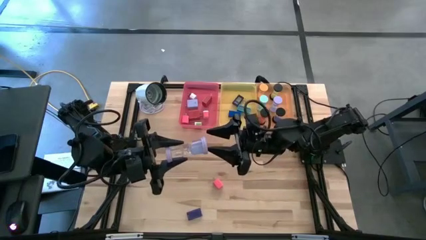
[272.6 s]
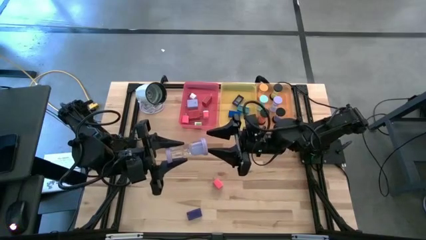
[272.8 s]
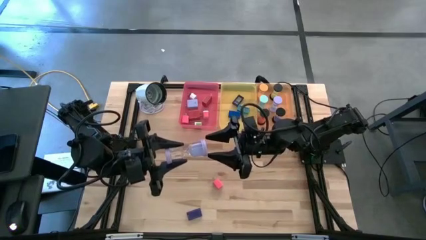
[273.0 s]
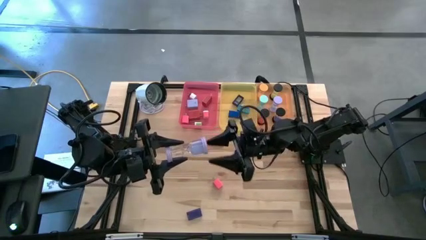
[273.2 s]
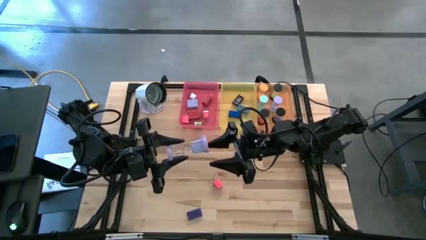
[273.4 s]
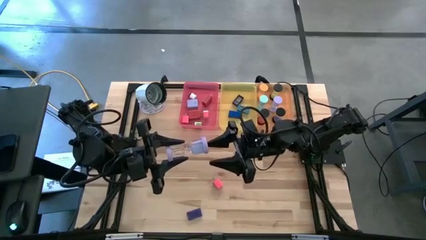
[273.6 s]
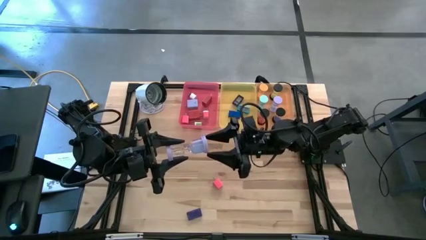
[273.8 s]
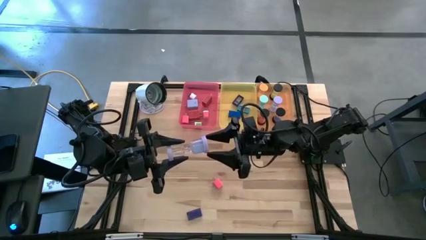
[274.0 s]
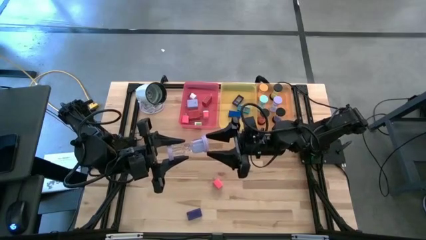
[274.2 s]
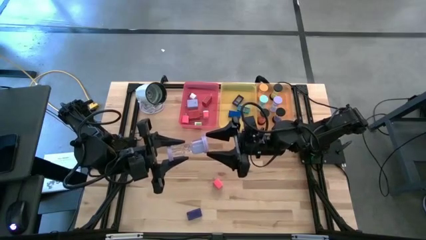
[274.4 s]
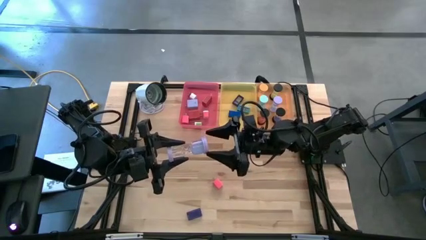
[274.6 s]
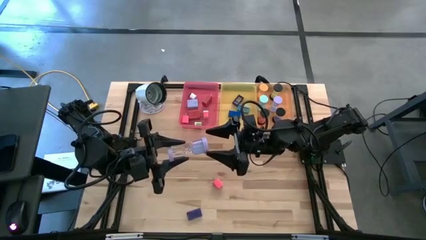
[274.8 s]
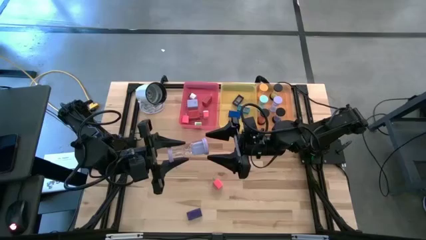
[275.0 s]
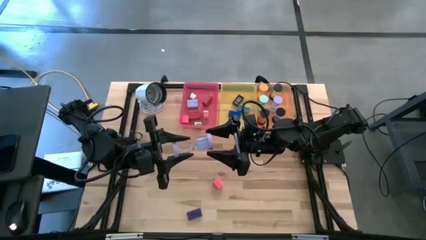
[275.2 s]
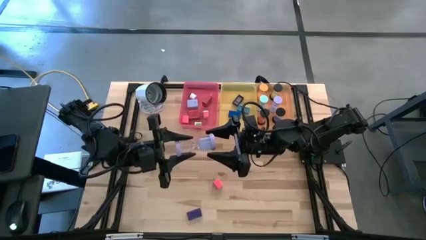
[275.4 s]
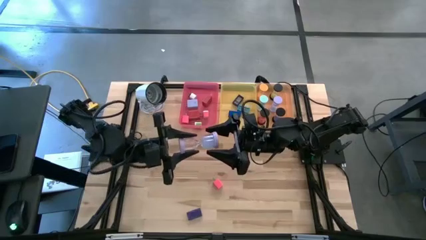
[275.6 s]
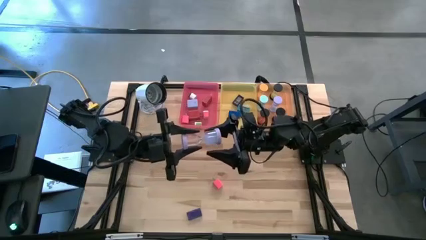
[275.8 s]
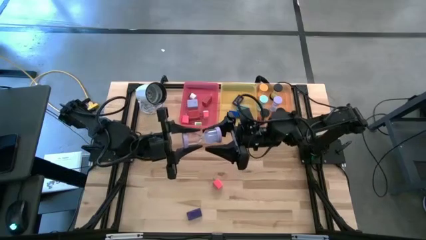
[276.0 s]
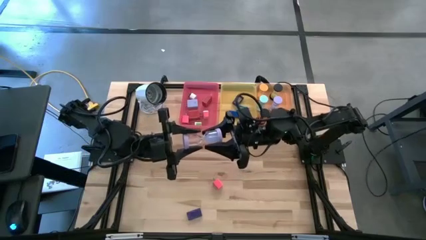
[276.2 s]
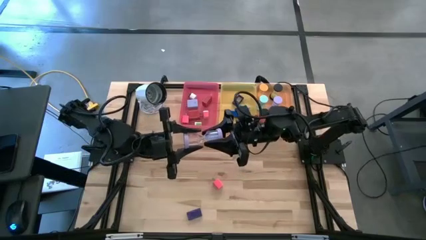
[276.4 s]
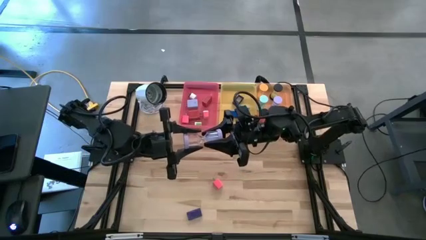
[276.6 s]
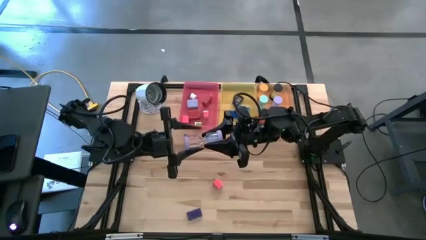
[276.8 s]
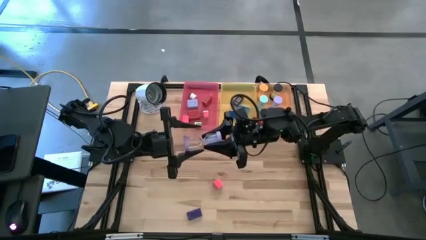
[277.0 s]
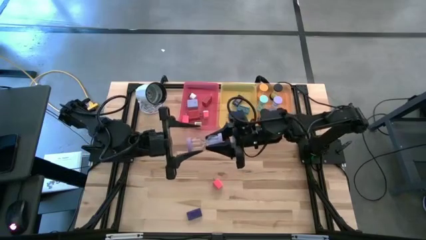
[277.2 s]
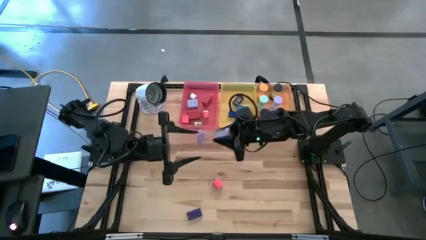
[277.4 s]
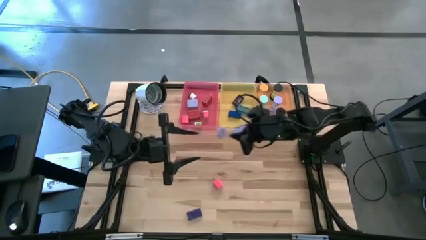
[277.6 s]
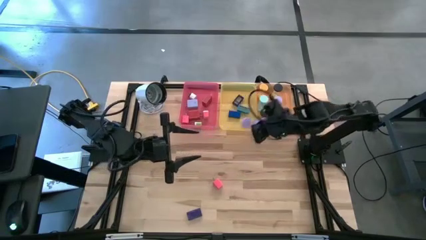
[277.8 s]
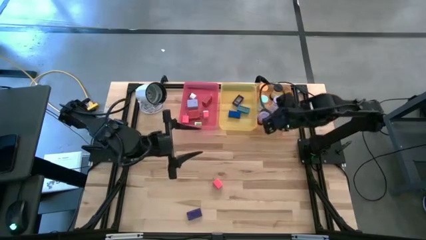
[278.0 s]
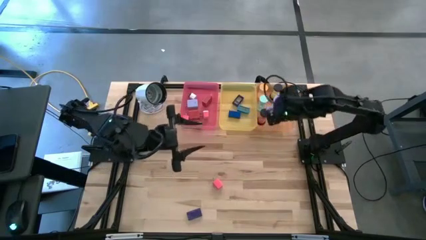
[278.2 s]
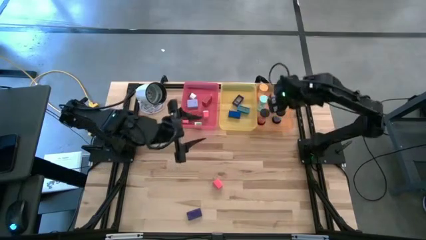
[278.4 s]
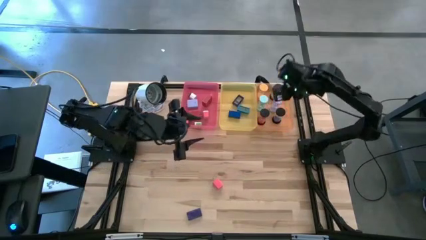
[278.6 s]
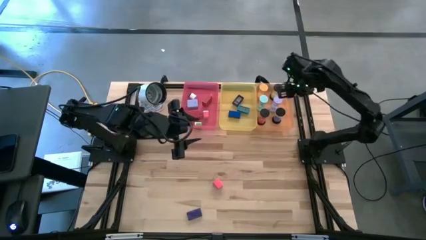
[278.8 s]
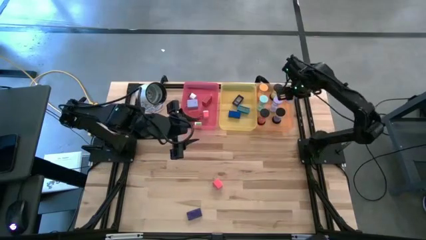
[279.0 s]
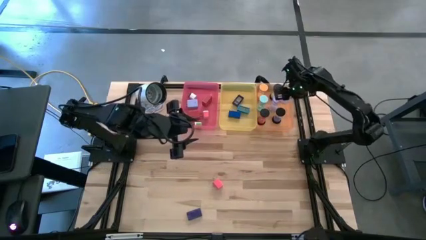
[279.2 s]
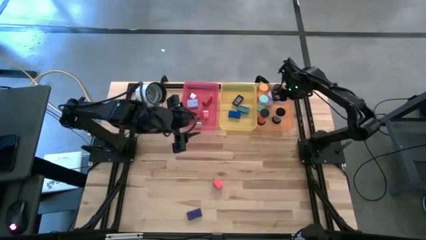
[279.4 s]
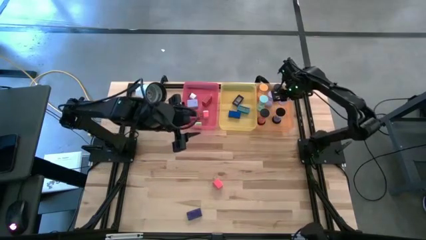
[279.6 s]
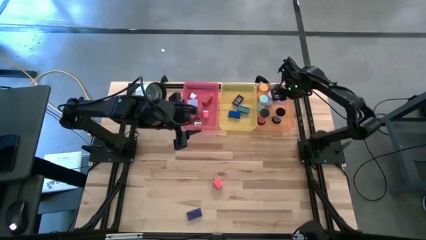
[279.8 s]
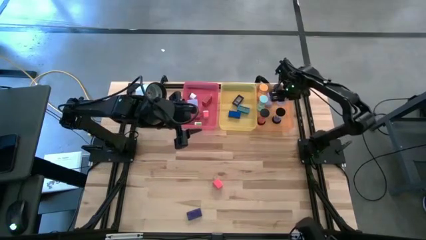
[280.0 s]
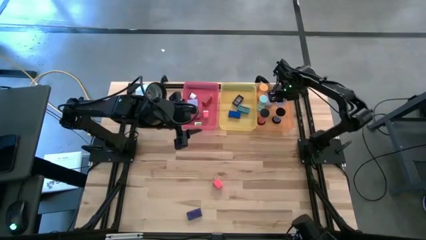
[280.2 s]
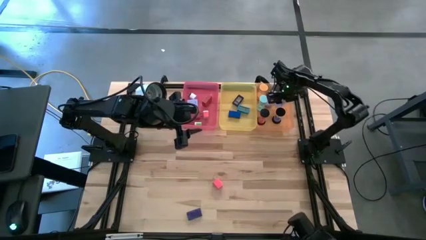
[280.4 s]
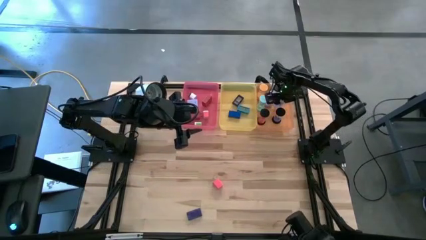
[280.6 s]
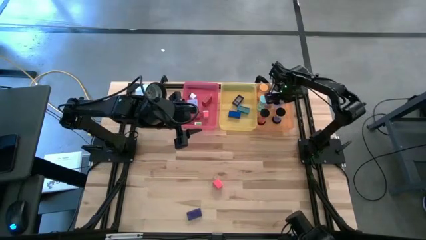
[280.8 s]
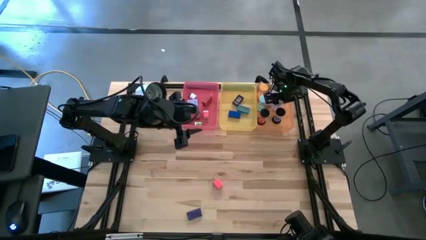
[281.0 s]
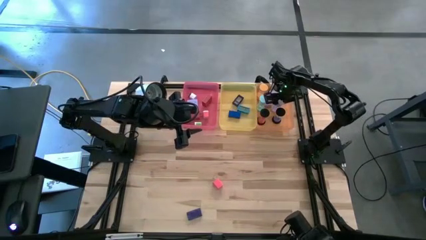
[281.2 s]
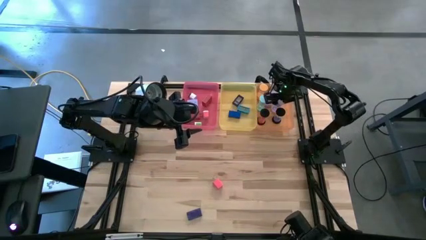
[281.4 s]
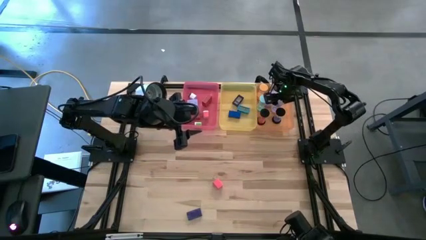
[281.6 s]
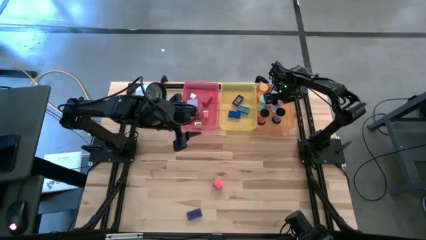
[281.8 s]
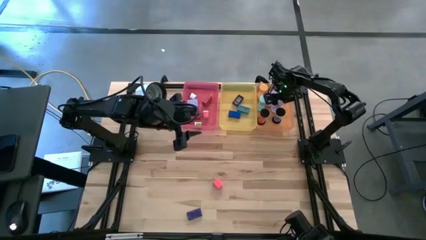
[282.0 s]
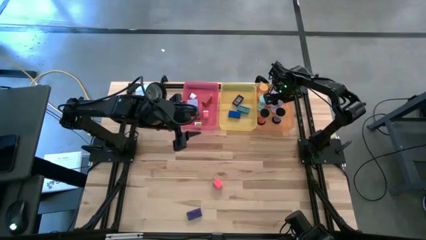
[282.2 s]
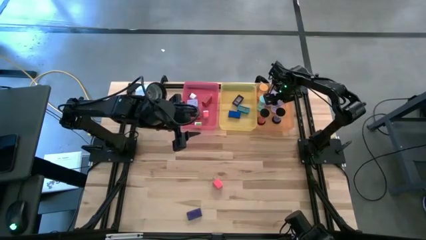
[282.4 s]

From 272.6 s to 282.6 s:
Task: Pick & Place Office items
Put the violet hourglass into the orange bin

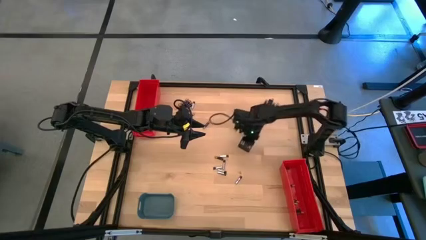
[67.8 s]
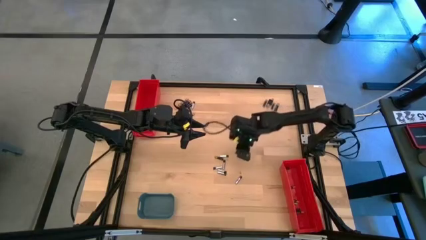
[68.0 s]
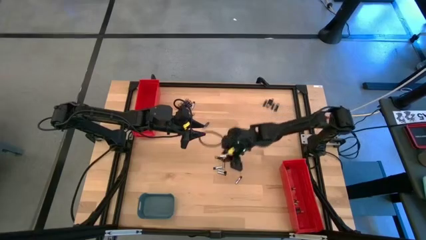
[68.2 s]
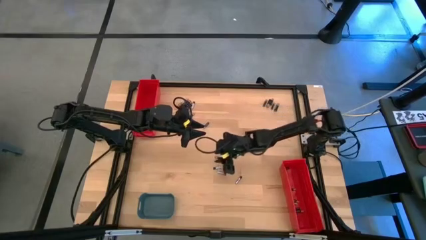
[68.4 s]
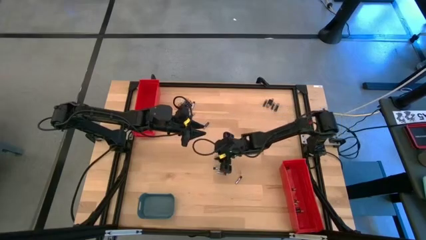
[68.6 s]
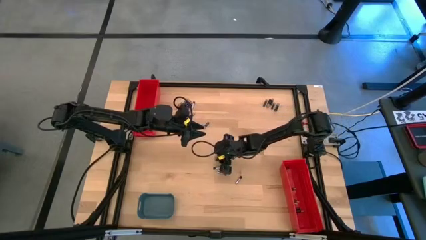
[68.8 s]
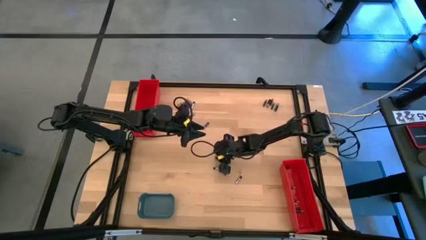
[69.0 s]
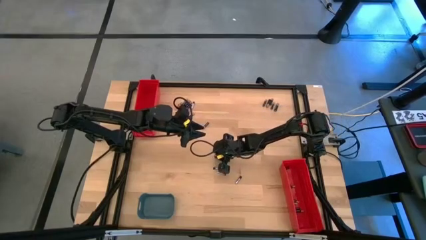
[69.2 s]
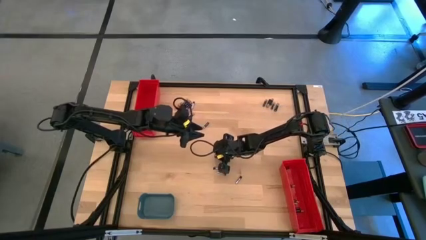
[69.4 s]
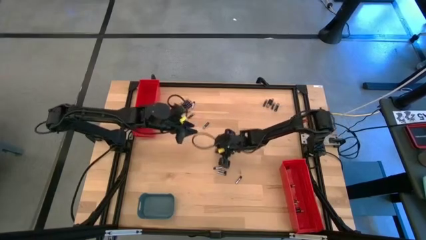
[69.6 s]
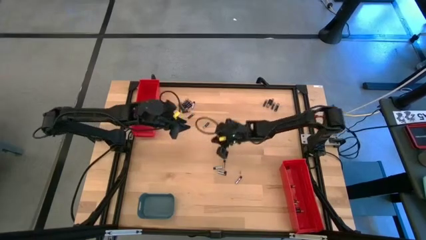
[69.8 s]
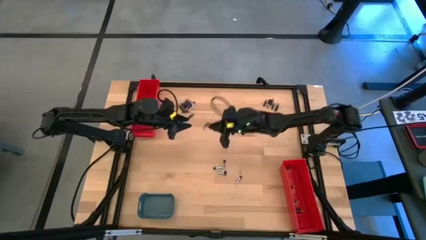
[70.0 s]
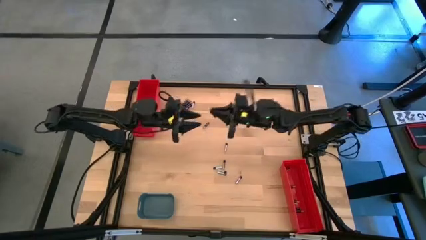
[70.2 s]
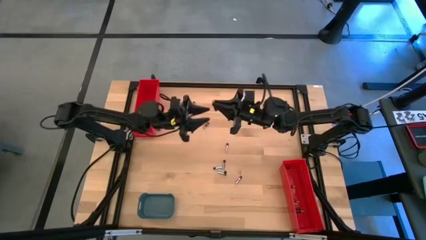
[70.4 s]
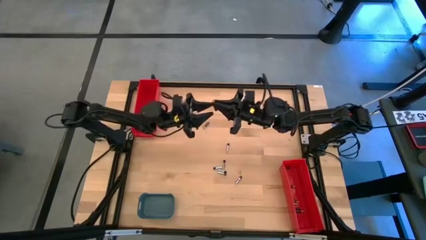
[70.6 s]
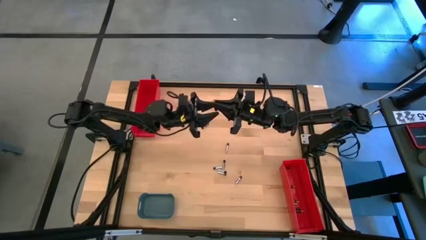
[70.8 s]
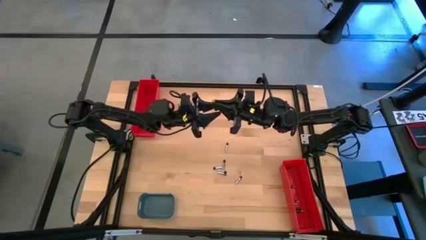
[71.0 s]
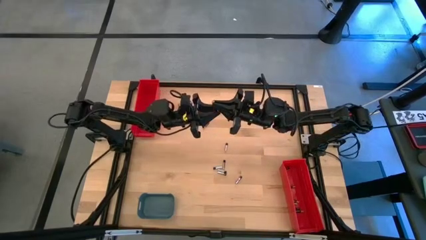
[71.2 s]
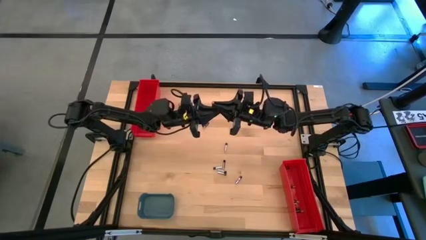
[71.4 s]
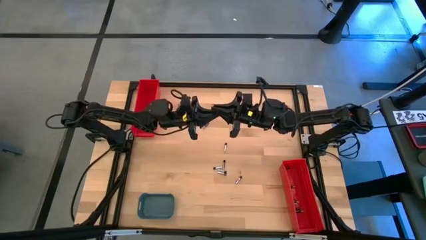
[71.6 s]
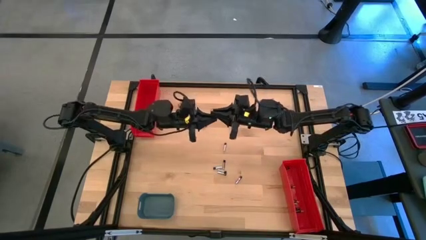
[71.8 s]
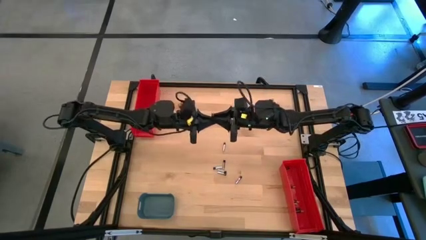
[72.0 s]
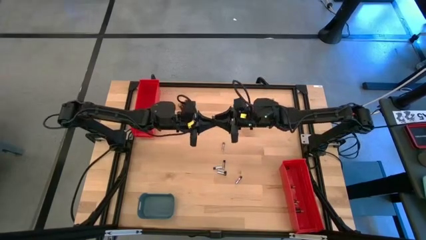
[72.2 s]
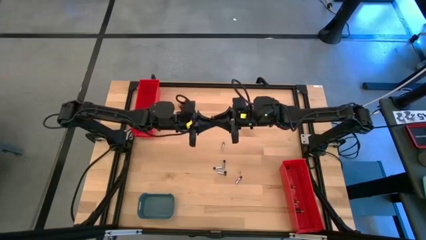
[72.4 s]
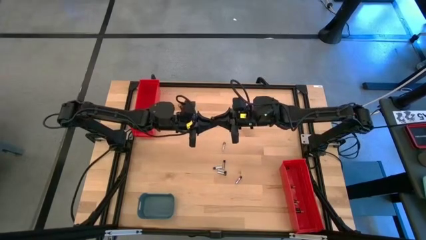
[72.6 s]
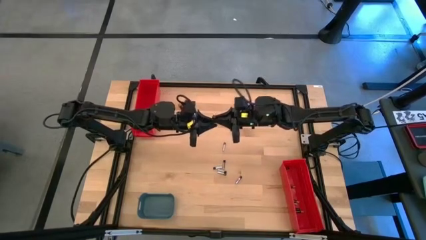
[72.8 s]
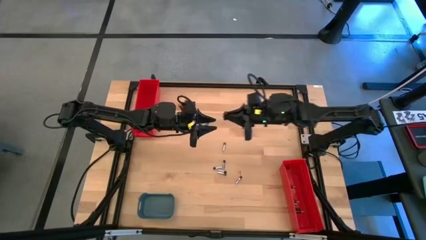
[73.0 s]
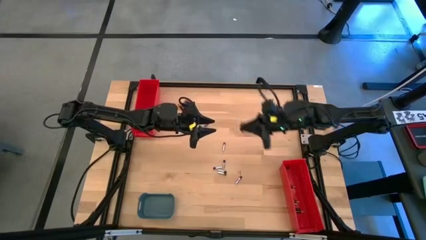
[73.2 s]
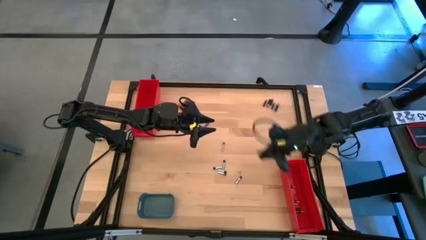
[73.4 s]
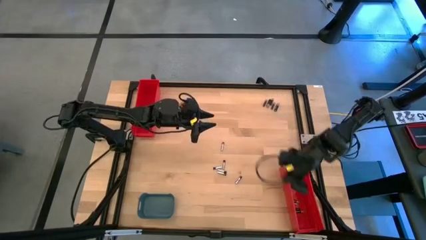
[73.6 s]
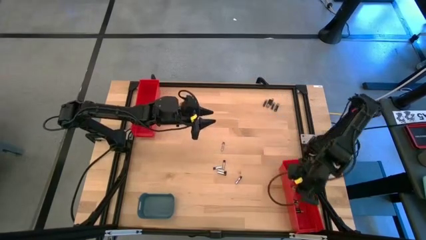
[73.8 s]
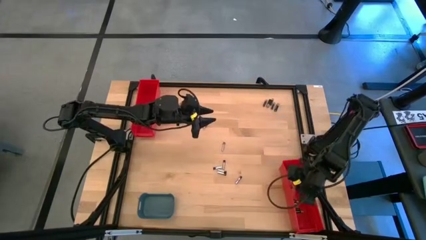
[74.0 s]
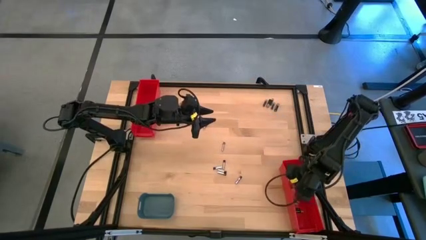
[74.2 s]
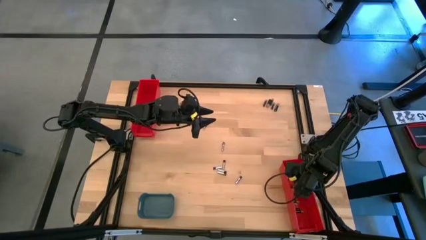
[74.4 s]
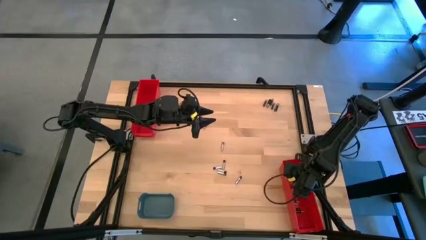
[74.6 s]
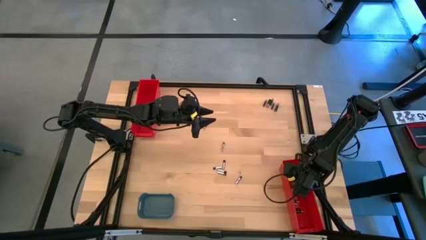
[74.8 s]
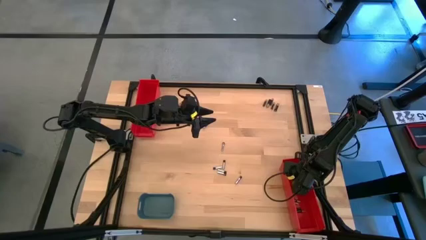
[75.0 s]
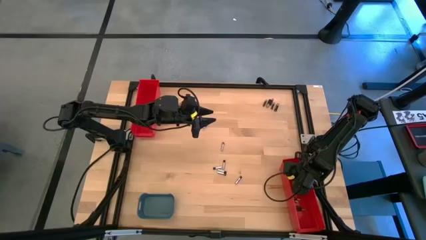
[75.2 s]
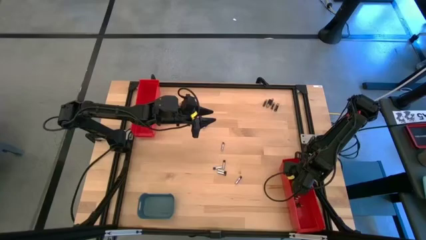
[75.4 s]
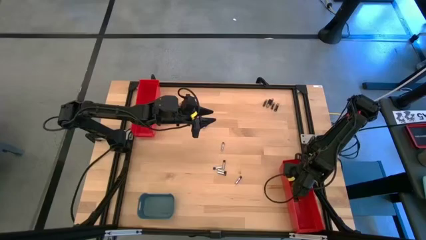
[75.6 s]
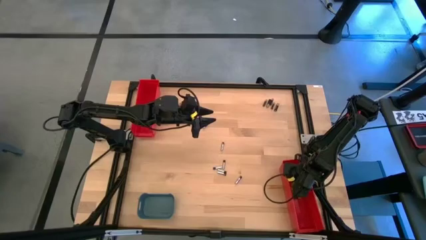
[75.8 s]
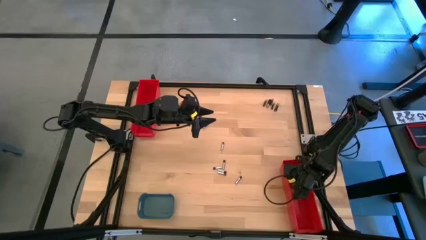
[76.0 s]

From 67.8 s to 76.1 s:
Task: Sort batteries
Put the small black battery into the bottom red bin
